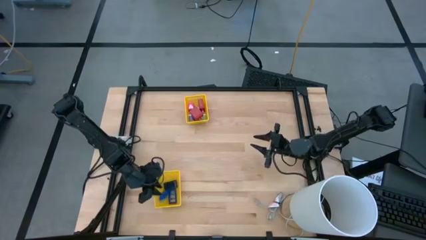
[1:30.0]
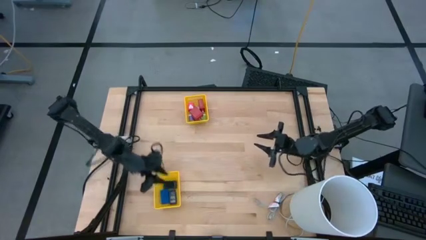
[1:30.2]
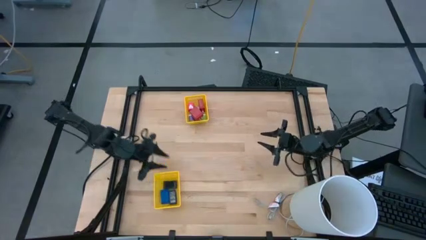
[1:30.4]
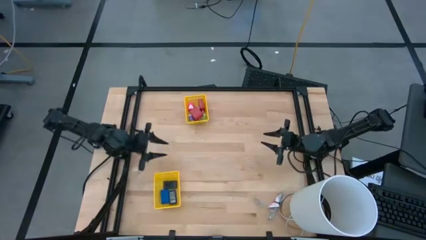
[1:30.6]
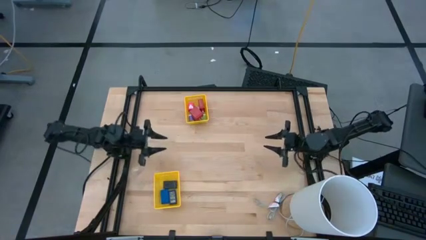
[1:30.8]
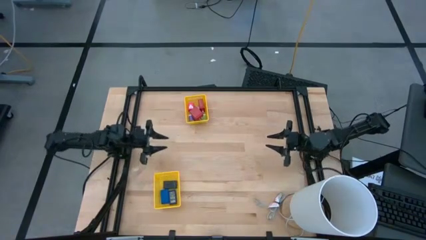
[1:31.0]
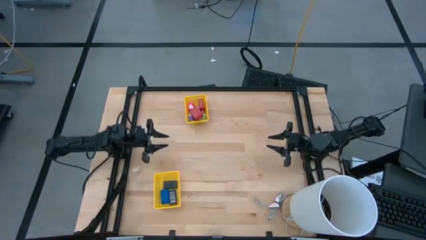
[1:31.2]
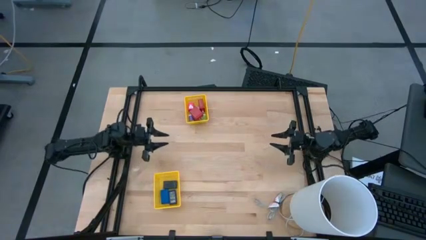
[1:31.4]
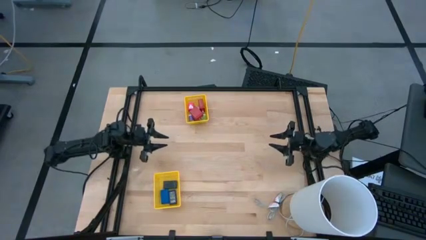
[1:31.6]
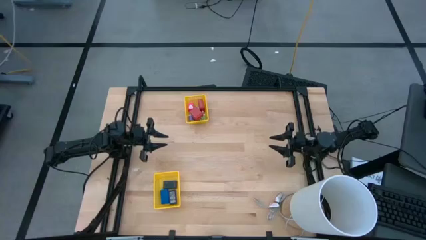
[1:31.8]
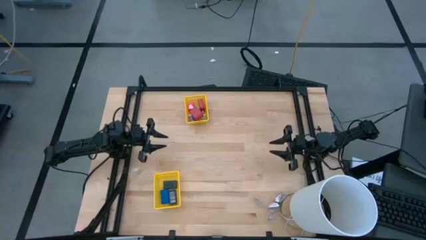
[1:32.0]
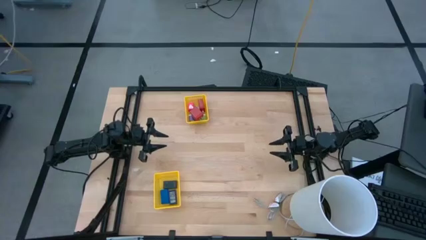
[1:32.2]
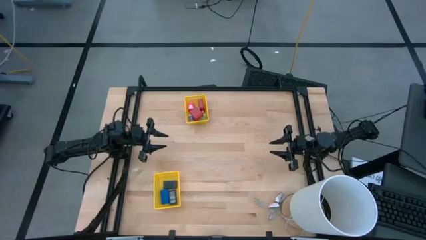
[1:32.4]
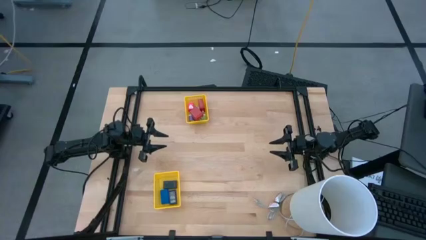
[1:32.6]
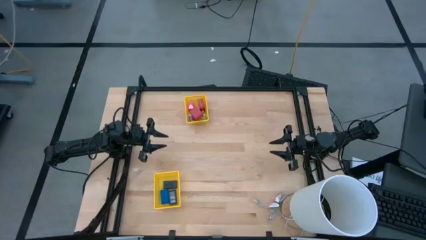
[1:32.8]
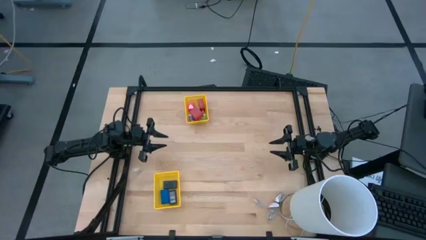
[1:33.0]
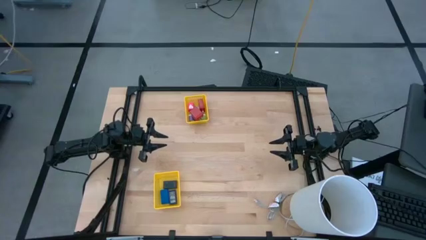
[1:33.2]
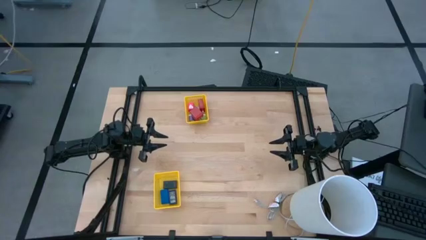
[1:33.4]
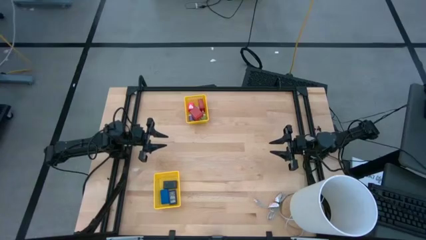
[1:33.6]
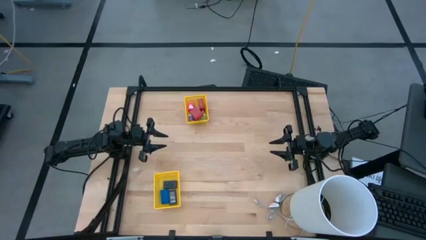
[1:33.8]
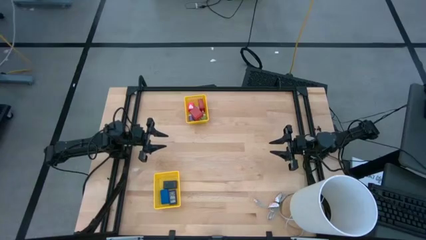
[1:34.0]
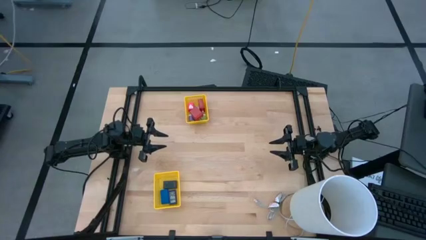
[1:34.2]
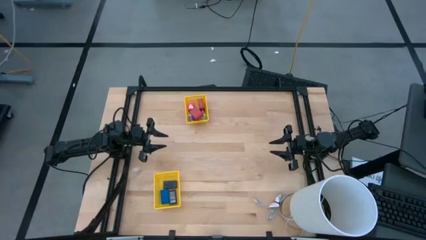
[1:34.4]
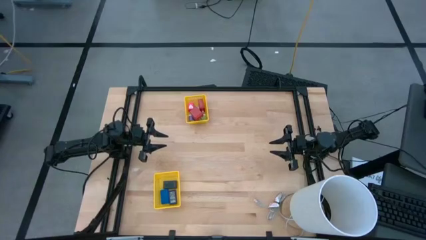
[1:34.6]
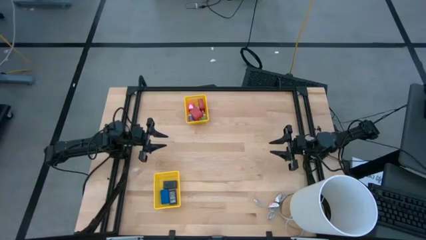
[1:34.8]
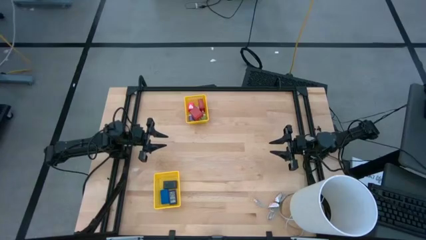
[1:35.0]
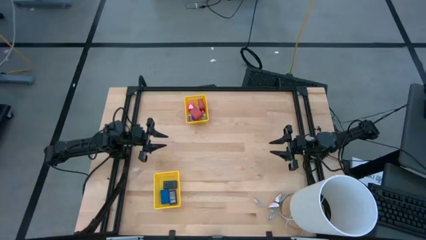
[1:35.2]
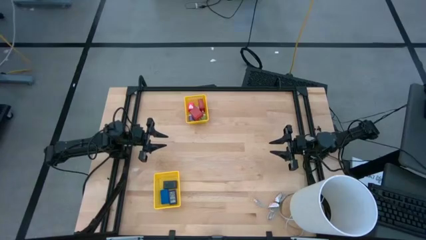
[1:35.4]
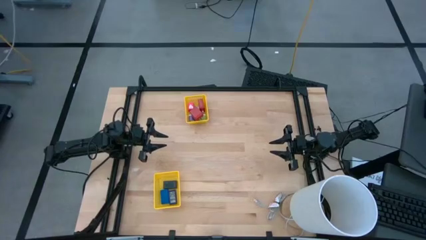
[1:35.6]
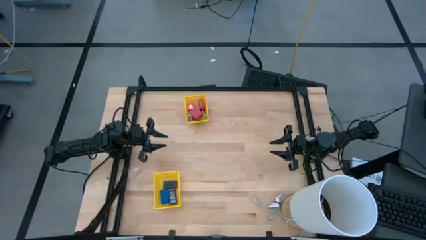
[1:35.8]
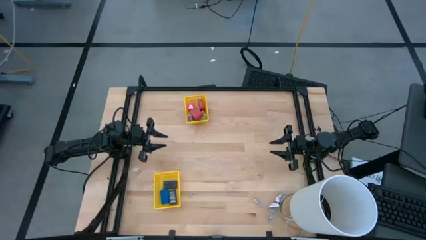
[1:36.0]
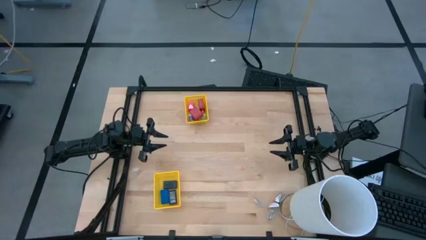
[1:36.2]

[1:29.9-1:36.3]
Task: Pick & Place Office items
Return to Home Position

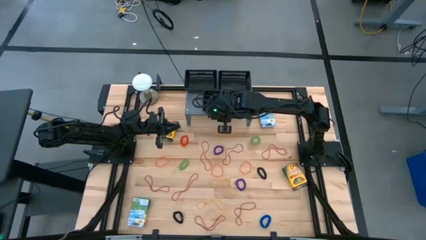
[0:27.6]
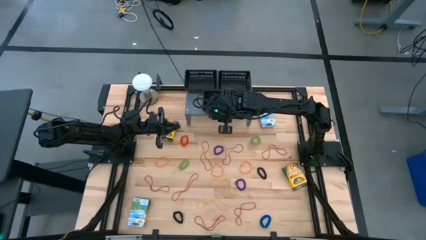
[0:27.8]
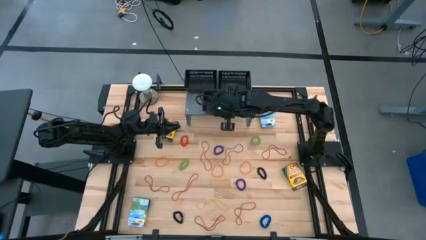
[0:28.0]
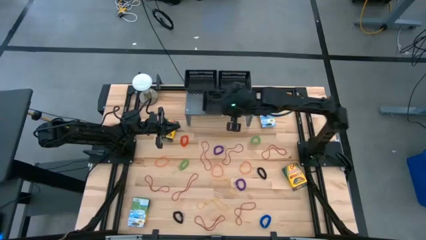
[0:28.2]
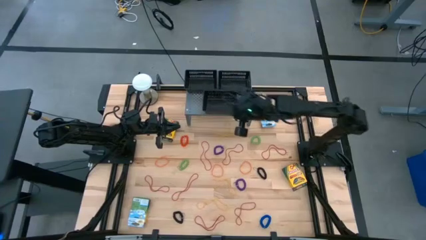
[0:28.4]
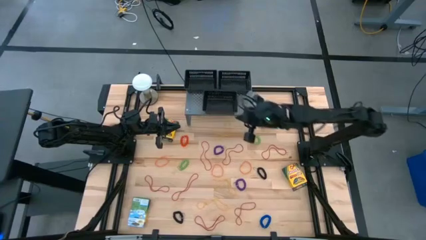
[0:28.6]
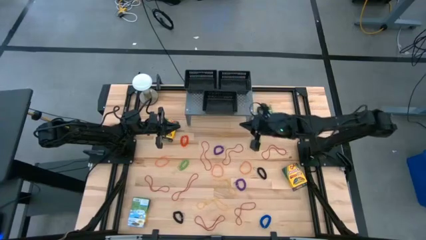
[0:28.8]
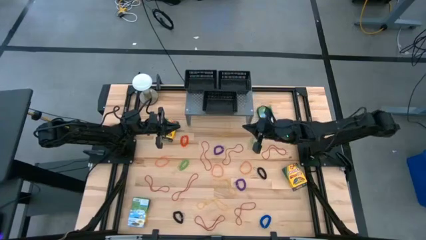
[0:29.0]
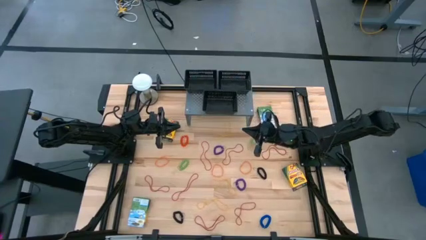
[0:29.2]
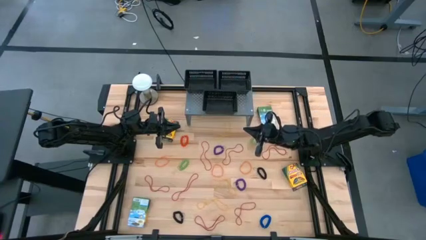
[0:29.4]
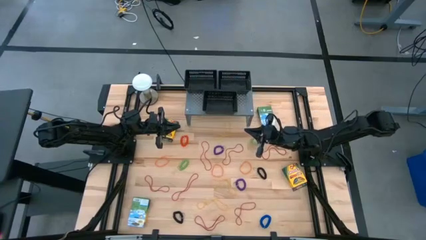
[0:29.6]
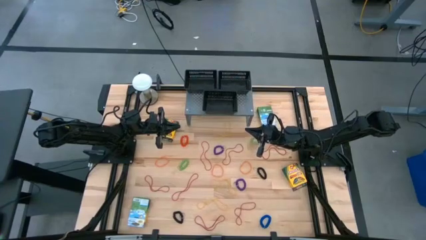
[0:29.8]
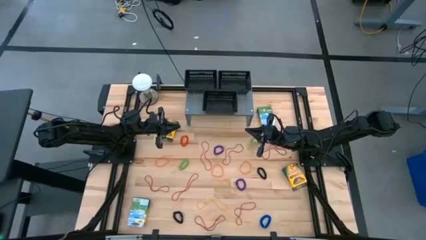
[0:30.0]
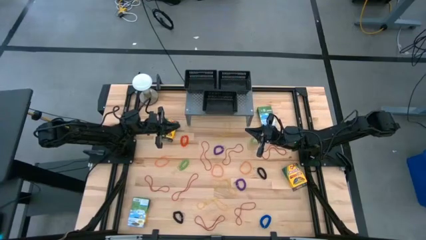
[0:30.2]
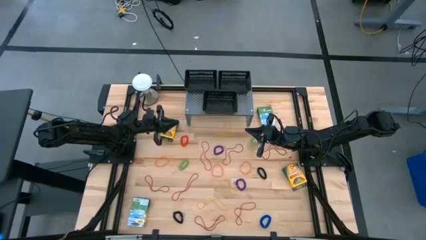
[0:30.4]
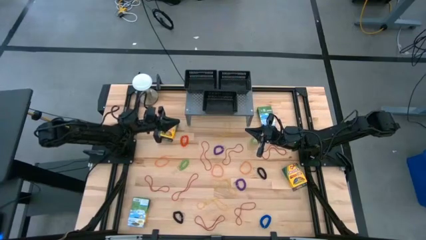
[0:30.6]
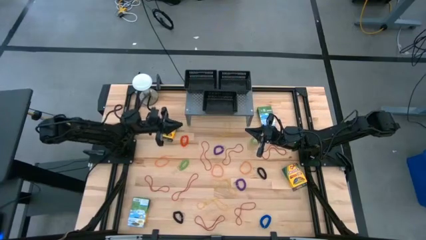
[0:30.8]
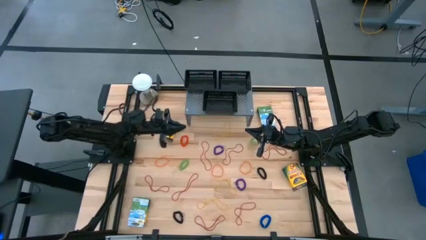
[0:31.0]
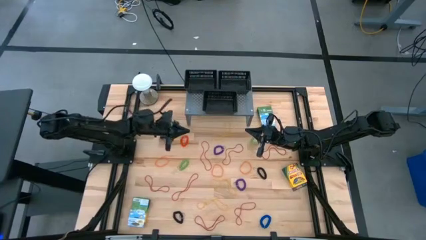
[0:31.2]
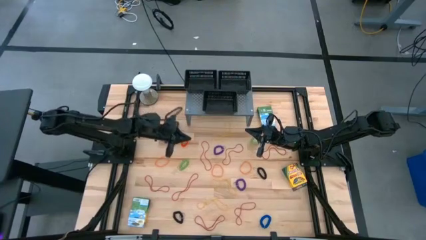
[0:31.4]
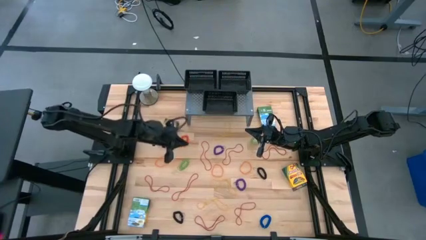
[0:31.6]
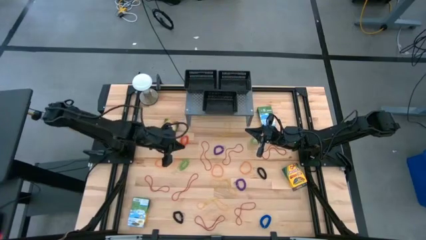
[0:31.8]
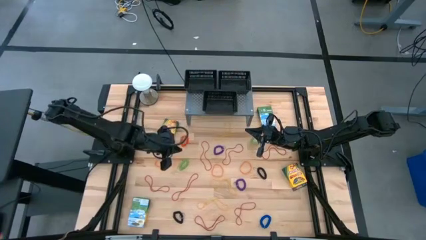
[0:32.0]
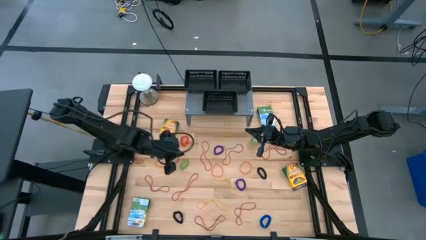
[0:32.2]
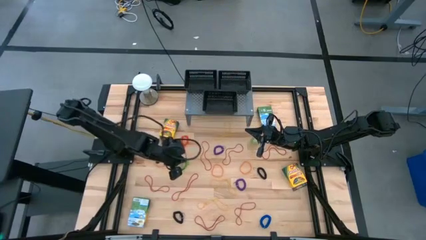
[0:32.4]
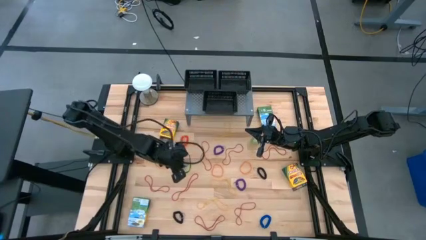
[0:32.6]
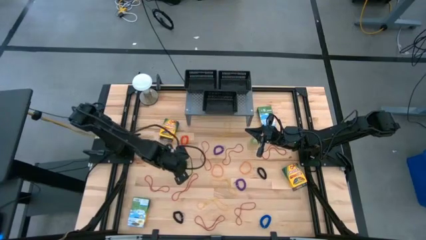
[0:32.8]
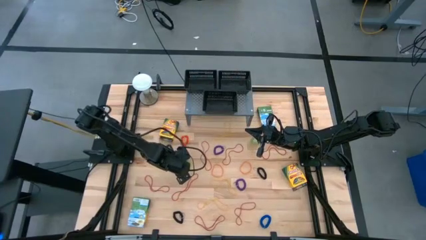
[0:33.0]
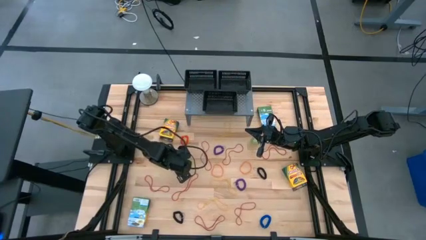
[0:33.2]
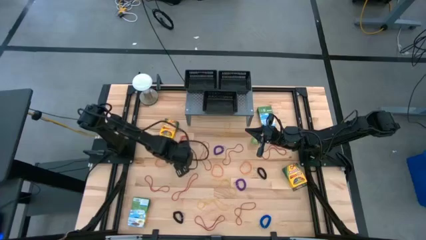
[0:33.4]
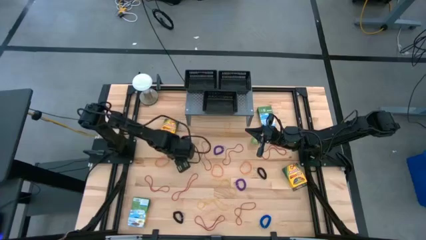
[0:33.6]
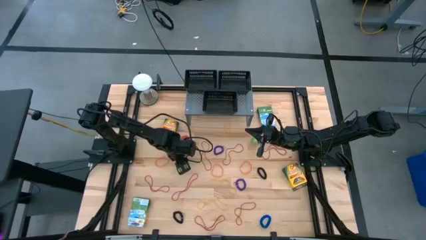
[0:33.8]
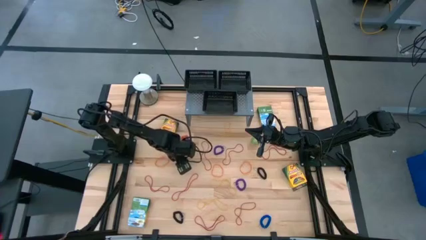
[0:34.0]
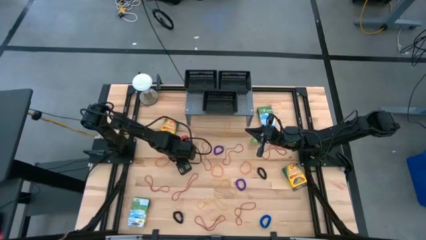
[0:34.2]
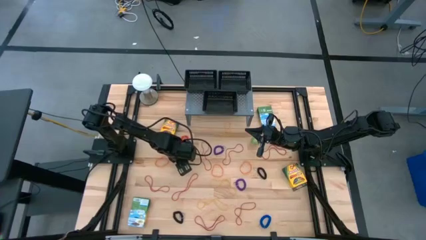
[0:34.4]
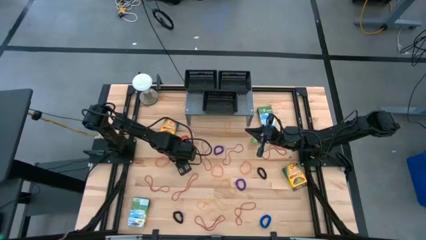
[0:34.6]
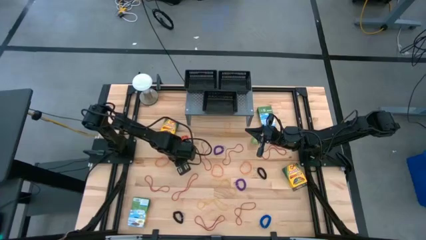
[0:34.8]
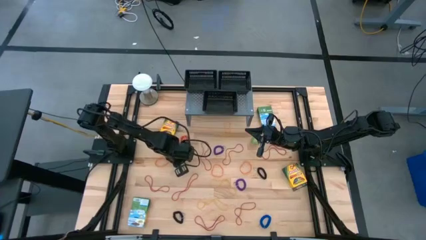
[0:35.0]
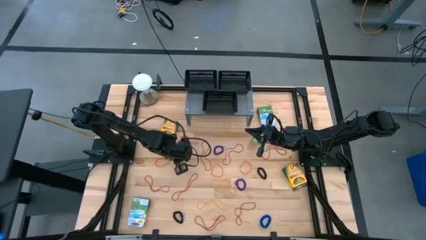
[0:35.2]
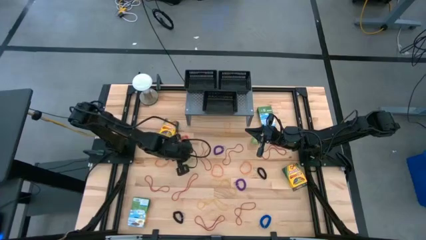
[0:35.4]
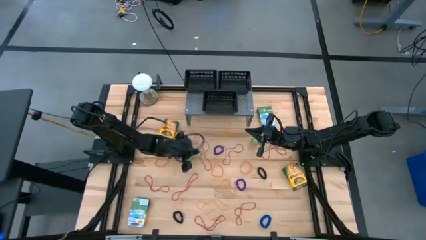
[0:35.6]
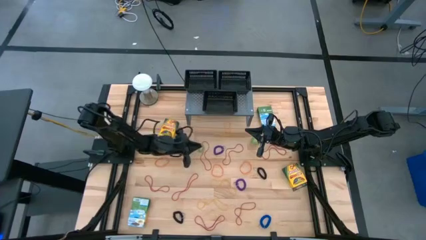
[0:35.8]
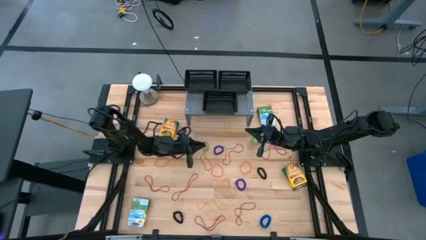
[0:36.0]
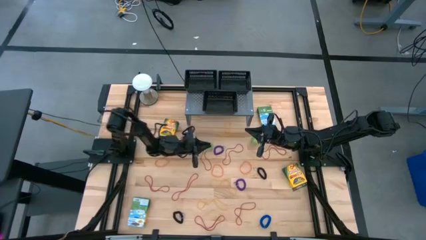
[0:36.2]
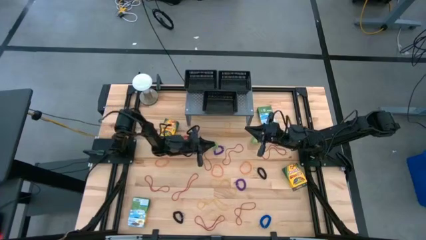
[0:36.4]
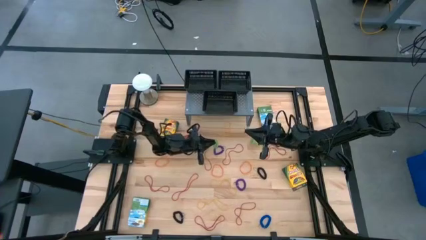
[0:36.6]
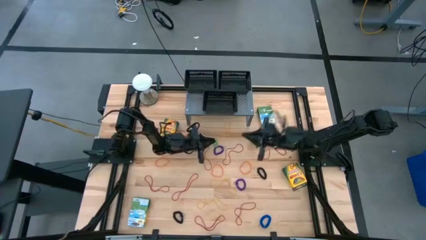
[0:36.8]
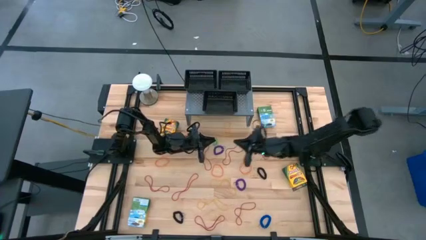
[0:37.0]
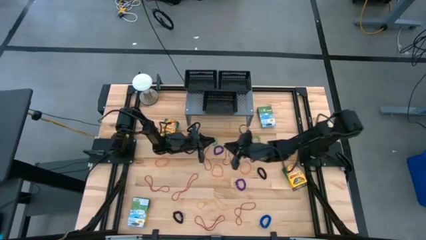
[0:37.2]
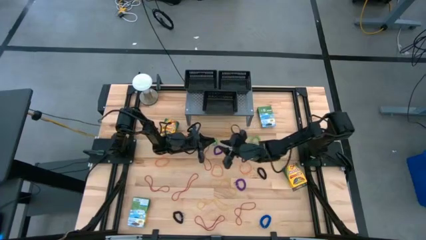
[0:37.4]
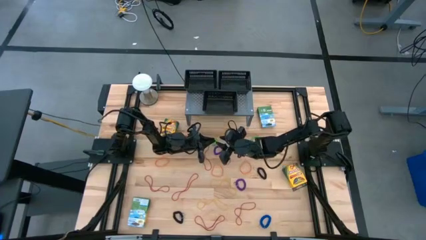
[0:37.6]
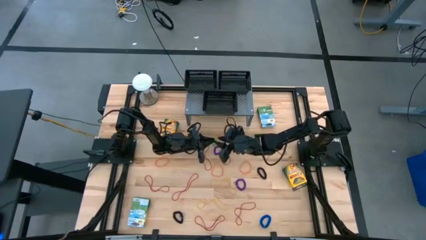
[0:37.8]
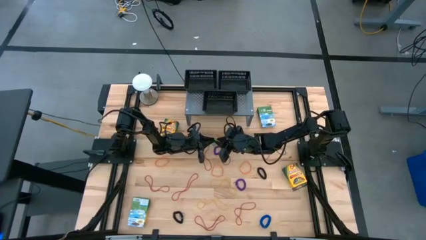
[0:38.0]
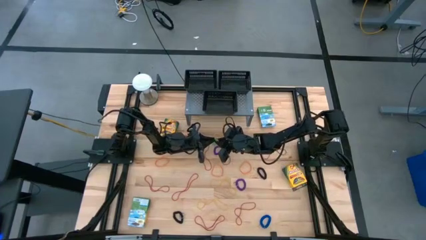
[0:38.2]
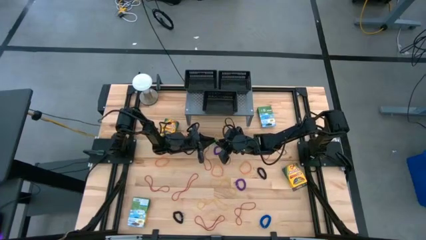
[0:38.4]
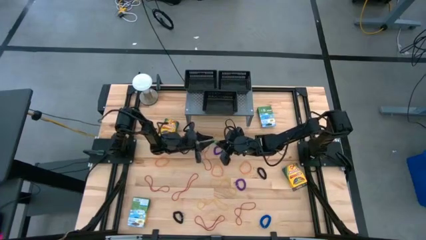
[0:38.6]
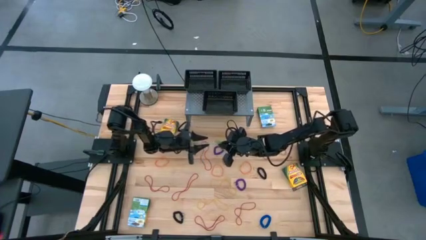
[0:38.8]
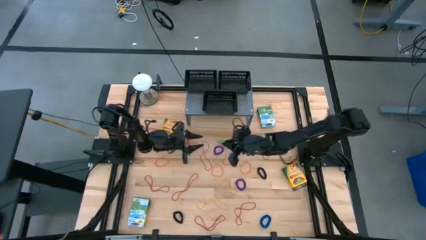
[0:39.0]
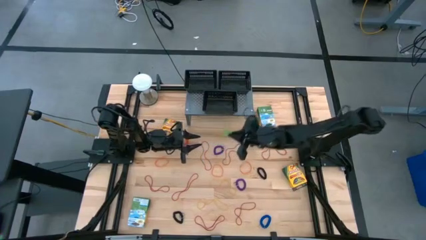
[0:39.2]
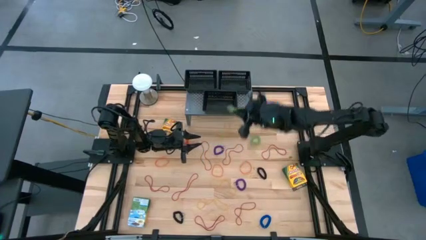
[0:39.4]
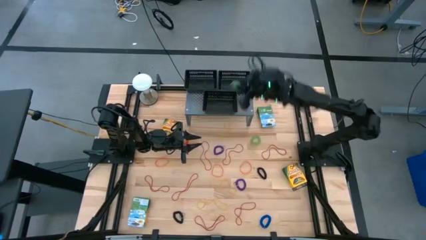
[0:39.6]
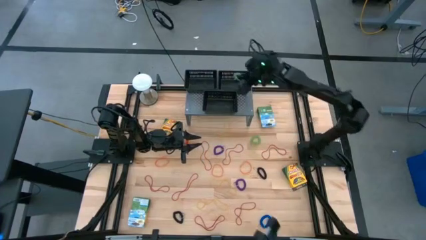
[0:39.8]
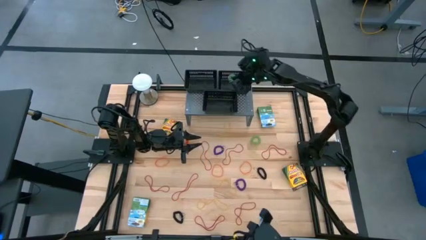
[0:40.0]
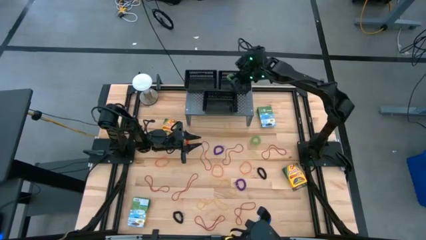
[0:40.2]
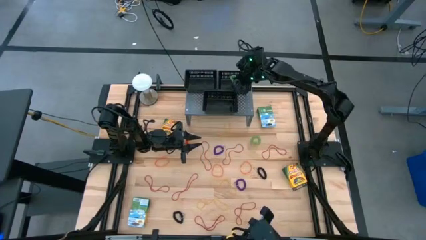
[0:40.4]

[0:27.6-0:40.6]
Task: Pick & Place Office Desk Supplies
Put the green spring keychain into the top right black basket on the shelf
